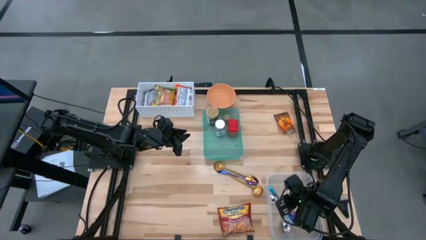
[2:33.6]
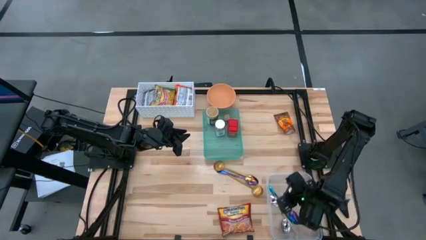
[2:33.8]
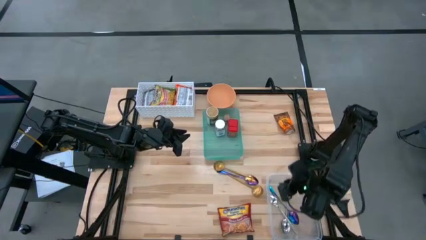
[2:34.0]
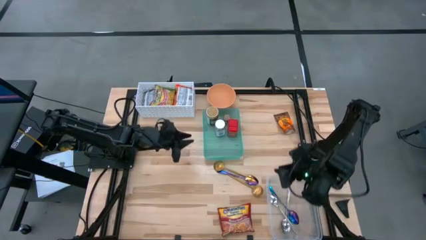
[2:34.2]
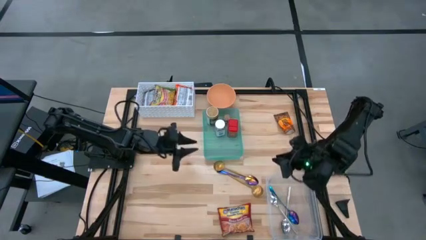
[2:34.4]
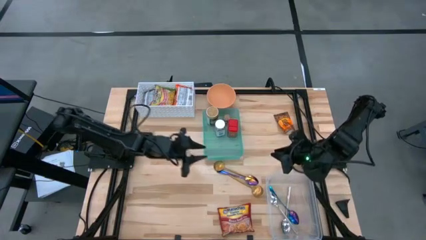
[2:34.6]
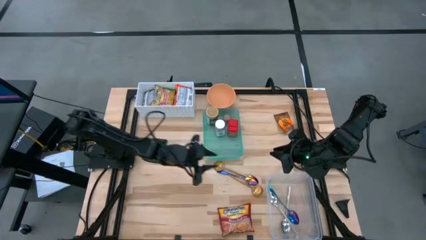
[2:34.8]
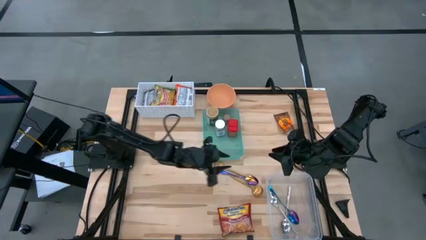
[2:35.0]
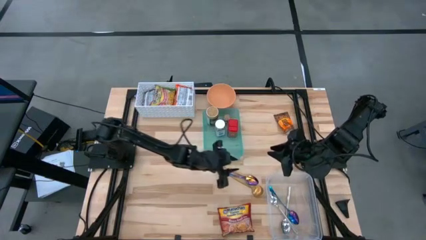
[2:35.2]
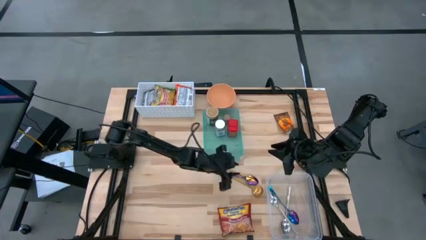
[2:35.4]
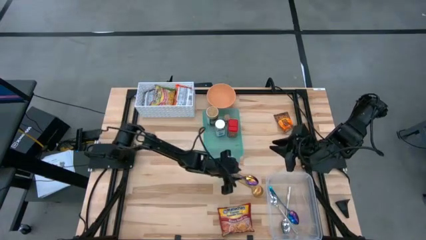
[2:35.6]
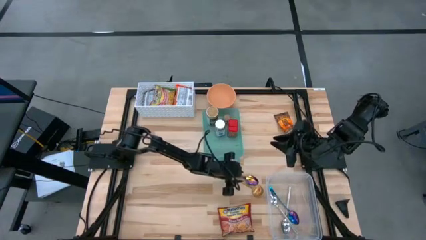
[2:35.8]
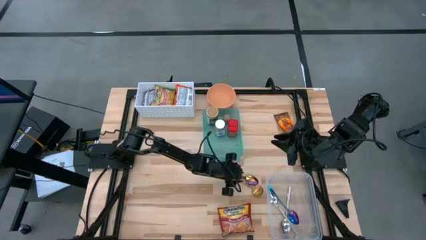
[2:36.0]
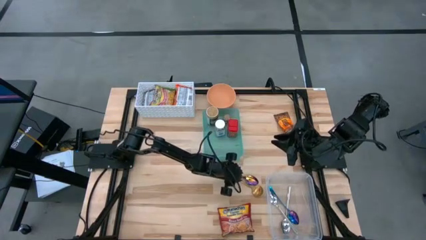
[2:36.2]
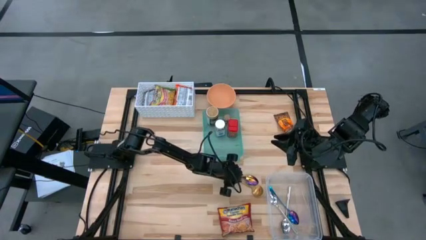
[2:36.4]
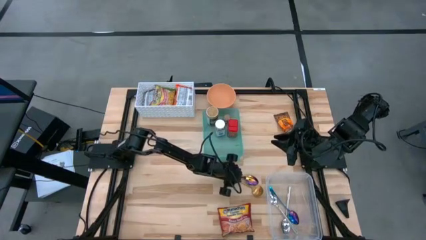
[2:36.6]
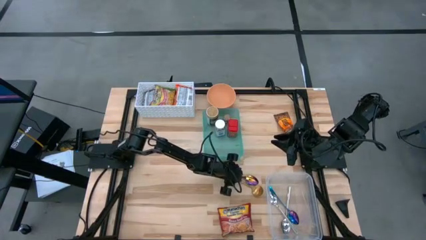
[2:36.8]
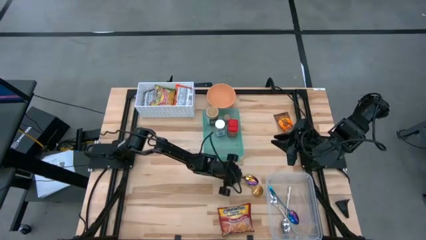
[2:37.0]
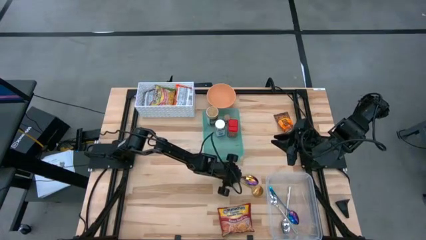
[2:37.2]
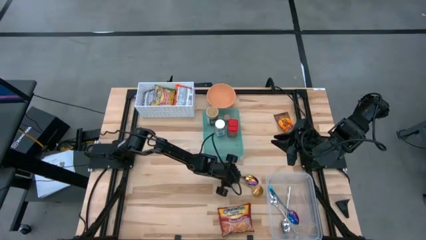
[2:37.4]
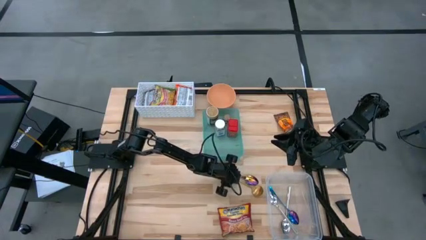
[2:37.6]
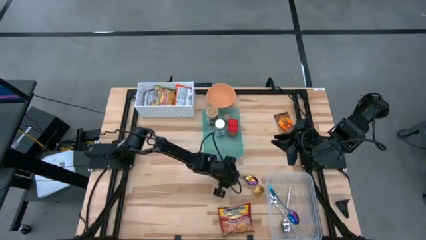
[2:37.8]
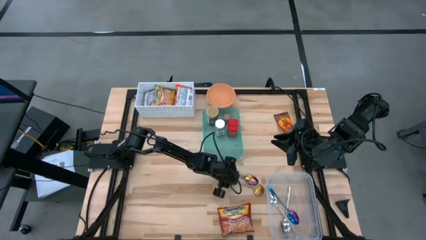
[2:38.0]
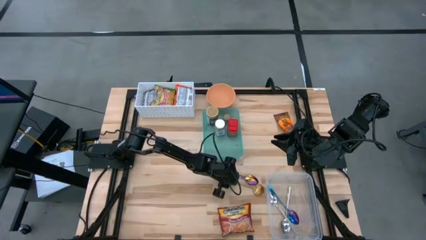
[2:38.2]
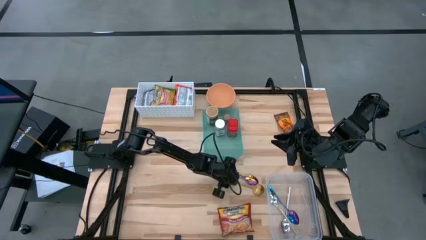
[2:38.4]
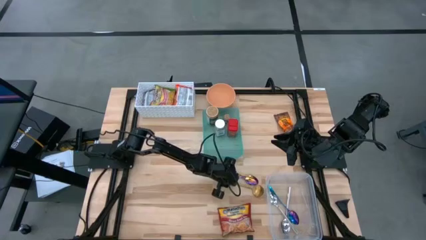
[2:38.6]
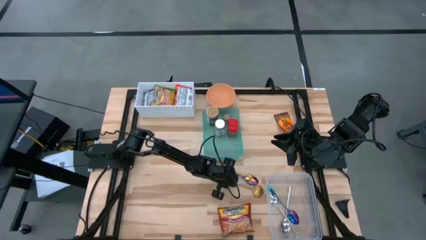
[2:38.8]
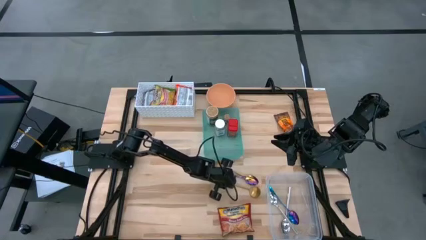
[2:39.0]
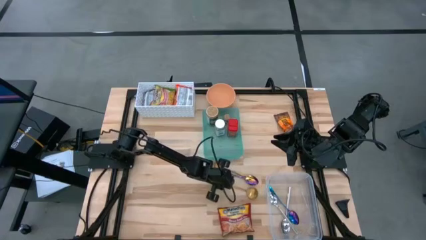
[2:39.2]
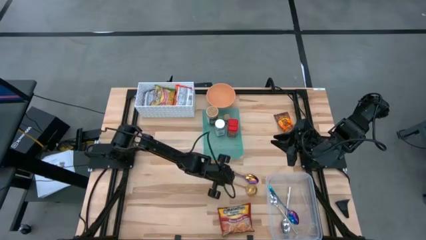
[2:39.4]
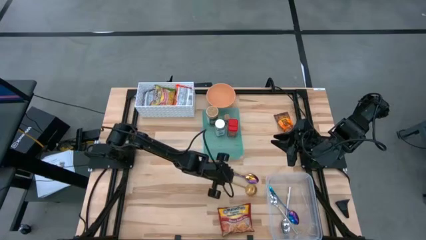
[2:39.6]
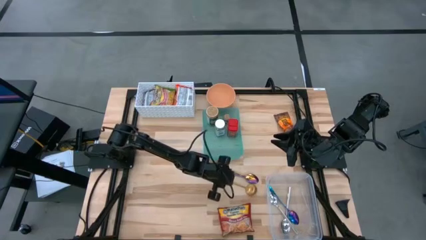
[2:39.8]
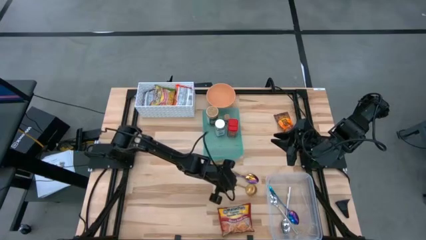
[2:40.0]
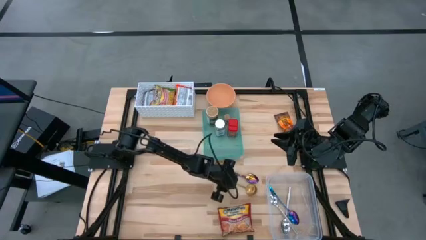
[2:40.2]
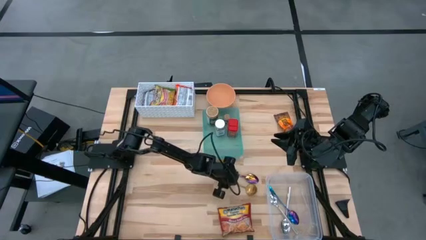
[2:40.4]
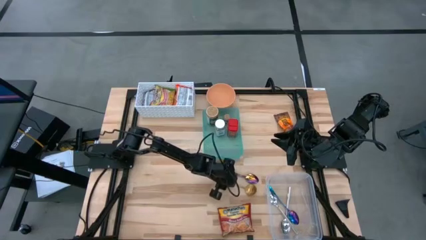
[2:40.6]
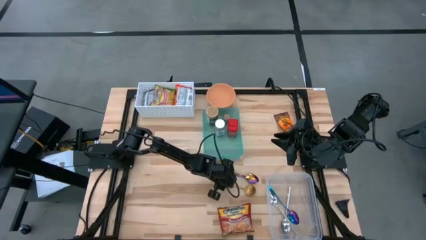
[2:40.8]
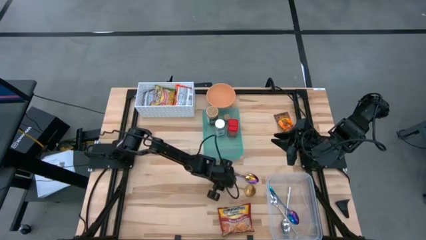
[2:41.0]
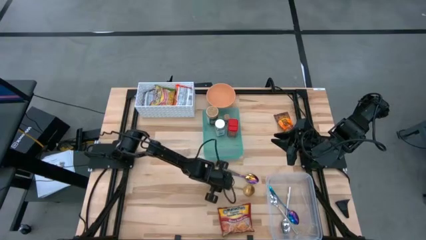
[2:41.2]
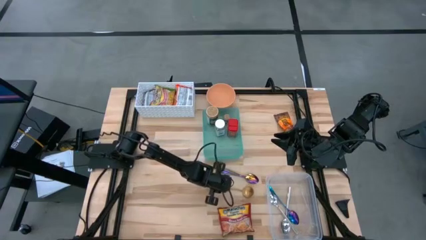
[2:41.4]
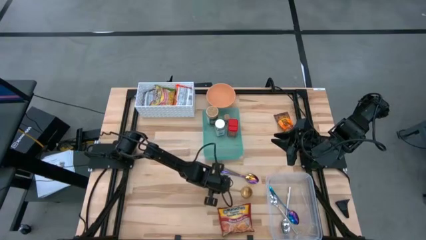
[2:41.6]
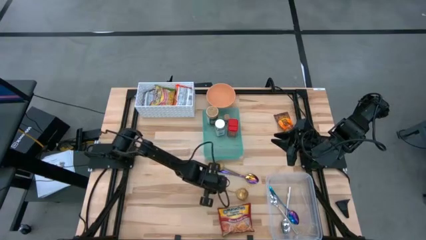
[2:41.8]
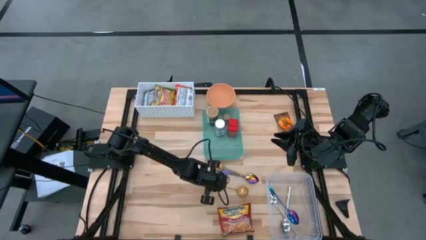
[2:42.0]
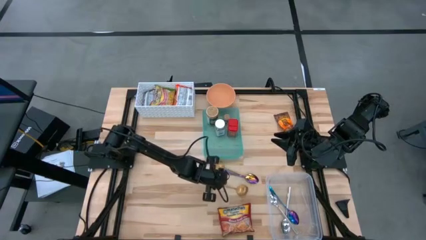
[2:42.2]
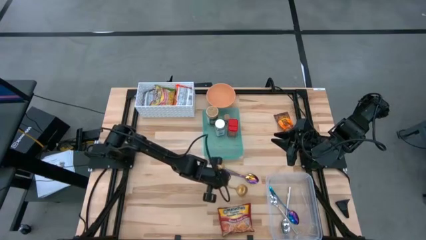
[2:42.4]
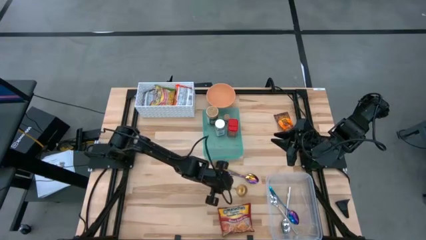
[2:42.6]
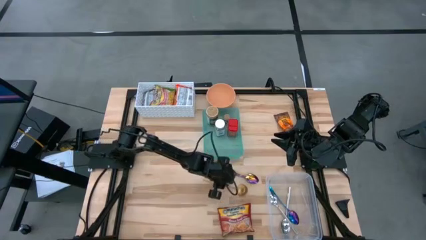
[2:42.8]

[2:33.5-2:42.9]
Task: Pick & Place Food Item
Put the bottom gold spoon into the transparent bin

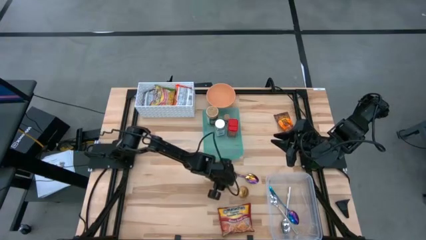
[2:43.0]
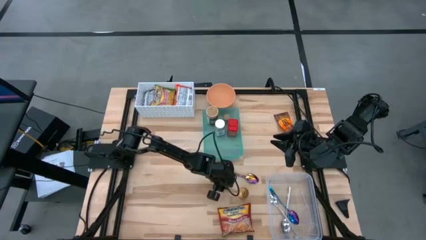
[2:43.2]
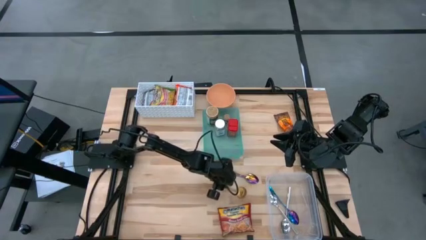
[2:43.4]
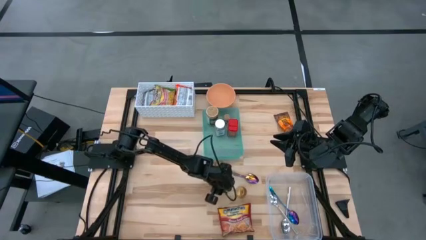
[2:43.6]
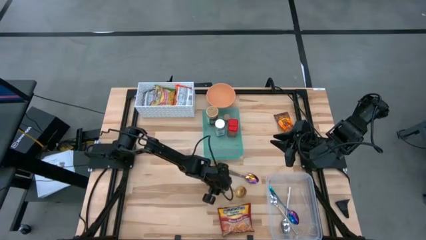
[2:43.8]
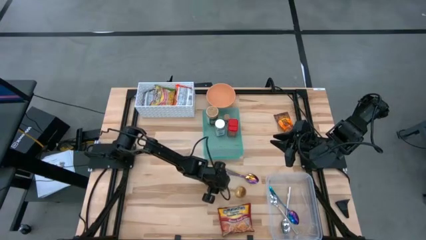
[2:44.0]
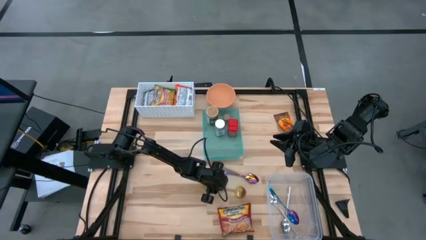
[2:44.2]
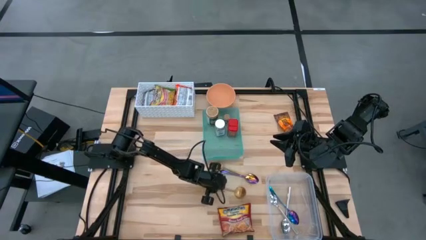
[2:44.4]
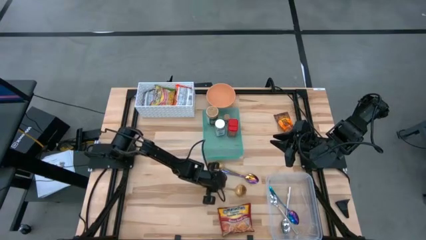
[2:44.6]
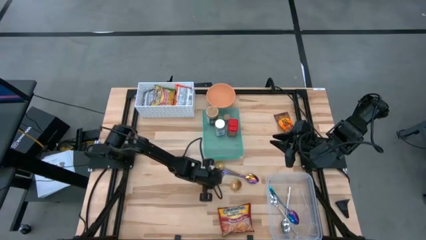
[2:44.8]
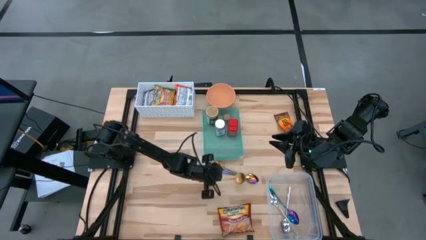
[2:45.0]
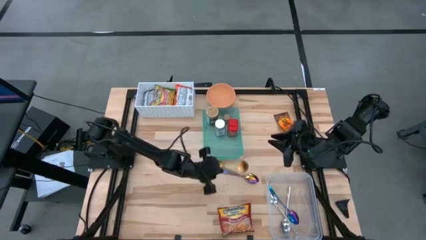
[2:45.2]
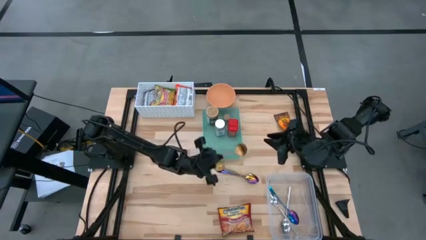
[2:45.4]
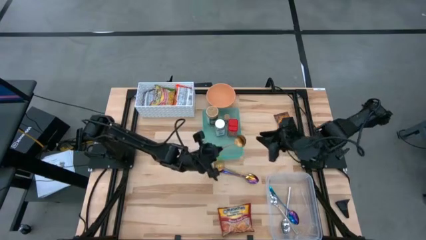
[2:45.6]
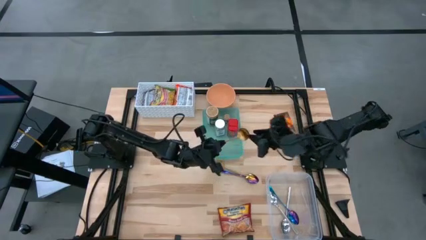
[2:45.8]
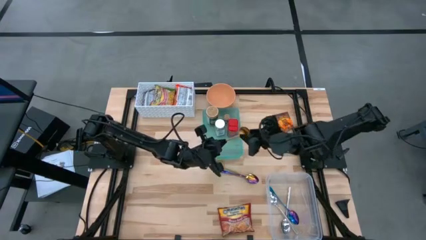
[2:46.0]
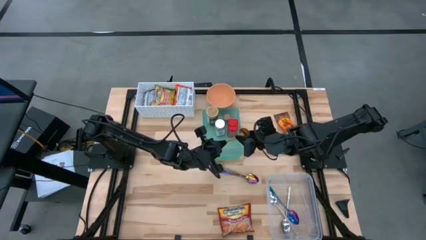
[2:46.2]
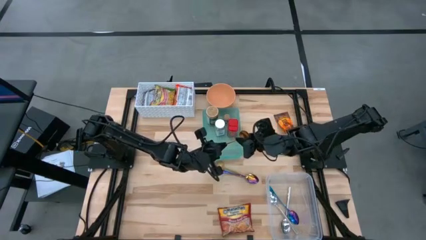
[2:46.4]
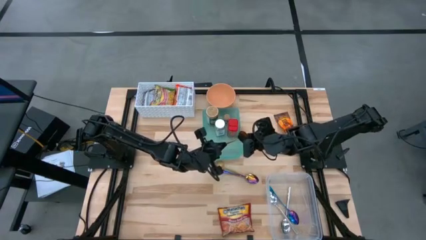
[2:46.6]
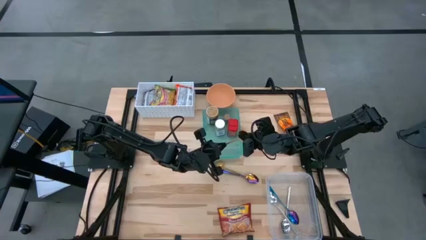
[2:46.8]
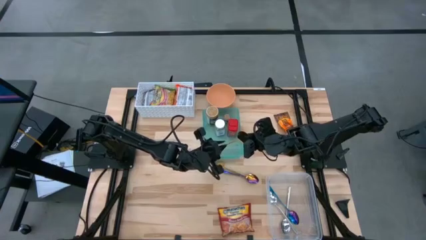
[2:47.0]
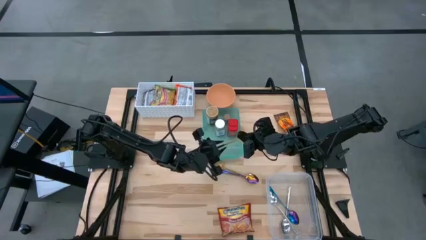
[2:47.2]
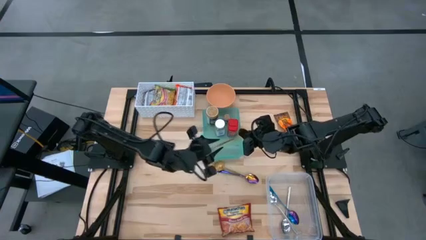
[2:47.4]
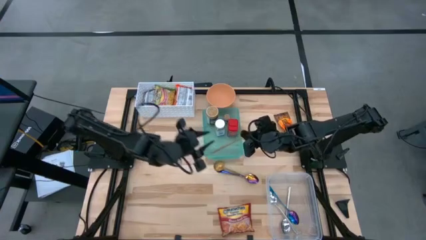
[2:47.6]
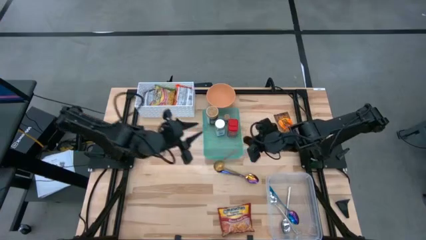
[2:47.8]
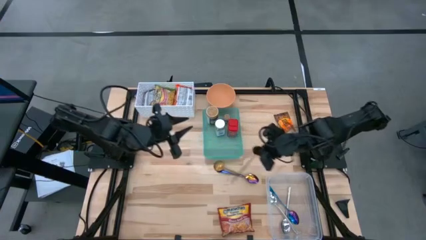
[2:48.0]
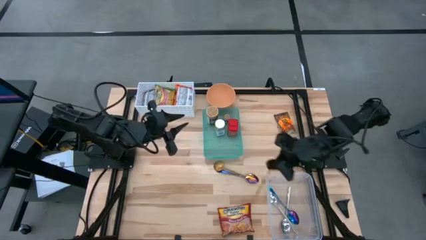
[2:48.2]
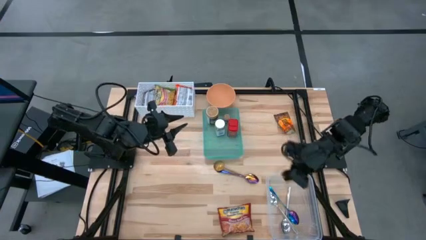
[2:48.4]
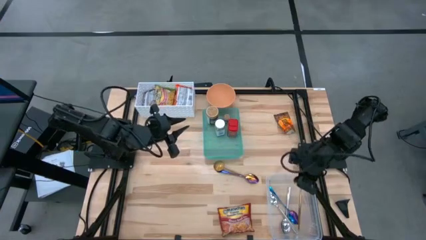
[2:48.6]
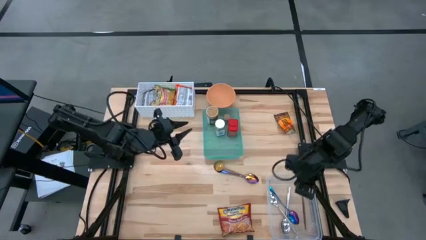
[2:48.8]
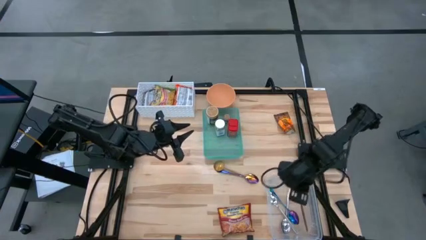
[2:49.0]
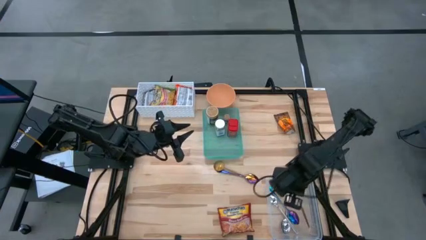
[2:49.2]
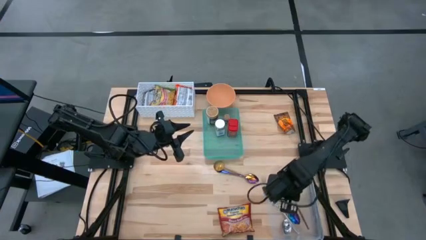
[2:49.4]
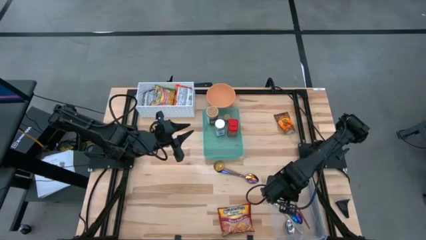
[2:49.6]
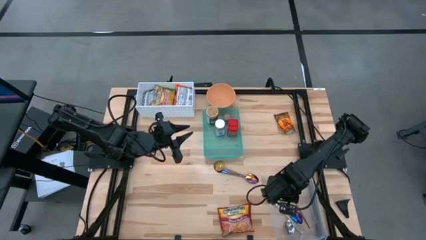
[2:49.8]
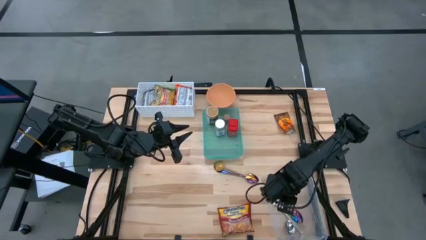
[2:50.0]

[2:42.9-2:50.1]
Put the gold spoon into the transparent bin

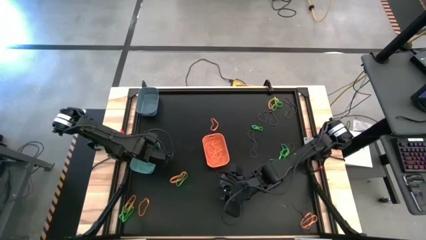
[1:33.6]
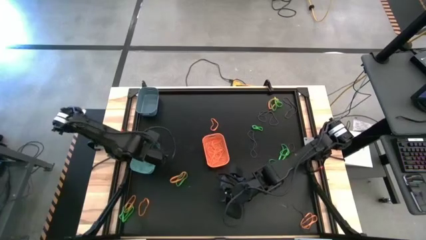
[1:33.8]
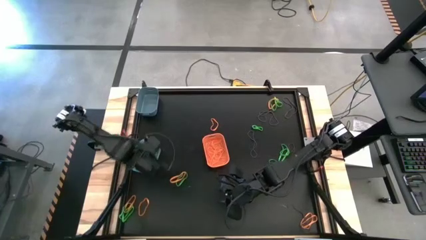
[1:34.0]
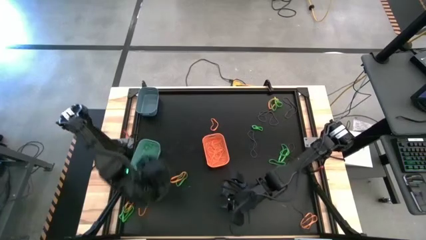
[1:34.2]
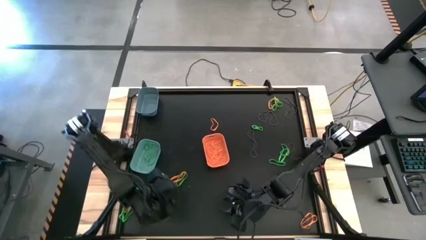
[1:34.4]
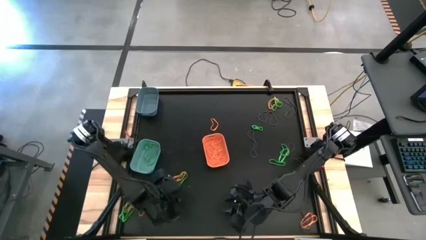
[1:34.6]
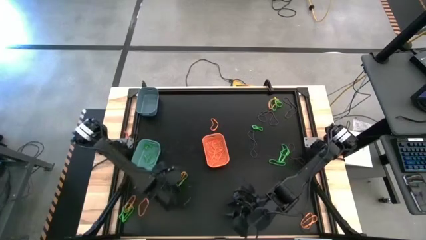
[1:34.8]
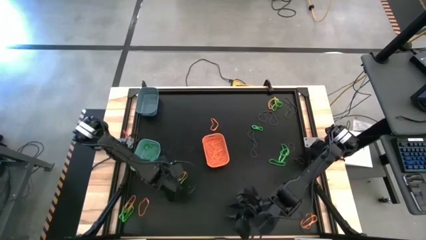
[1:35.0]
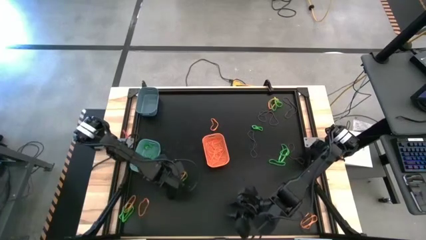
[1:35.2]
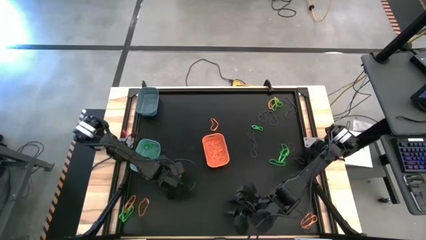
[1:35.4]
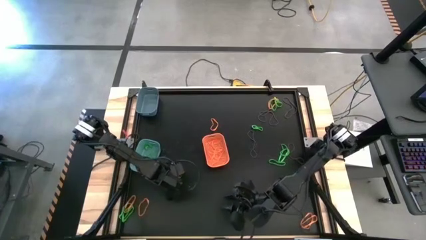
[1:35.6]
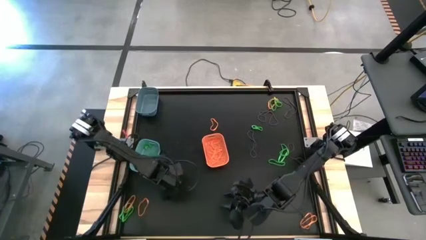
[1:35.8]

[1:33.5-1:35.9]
Task: Sort rubber bands into baskets
Put the orange rubber band into the orange bin
